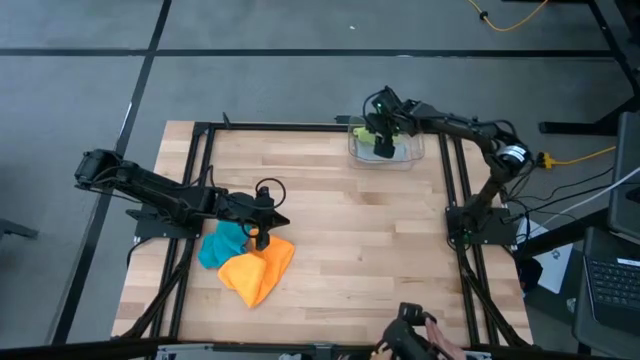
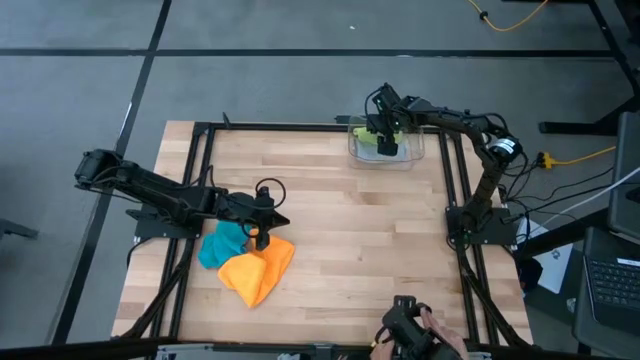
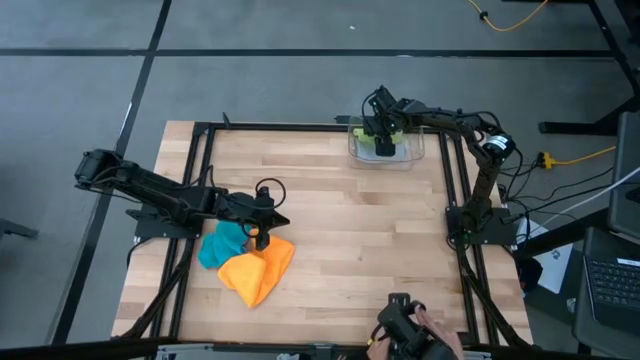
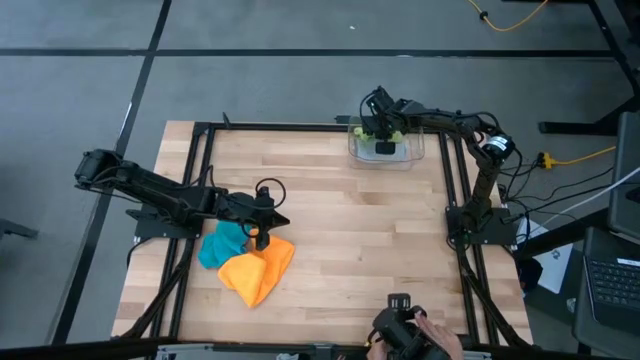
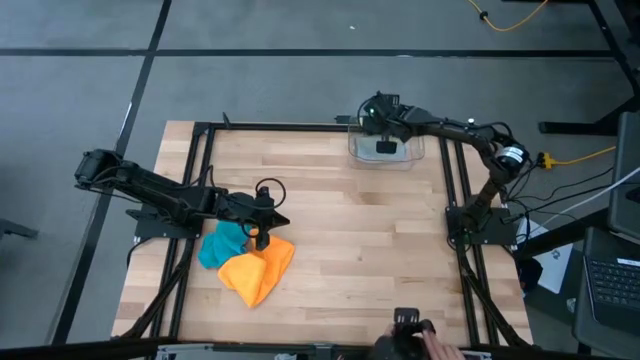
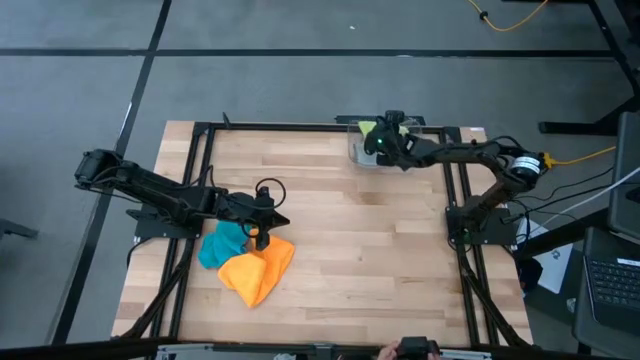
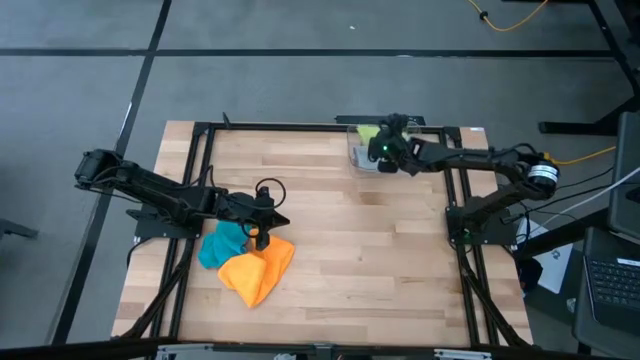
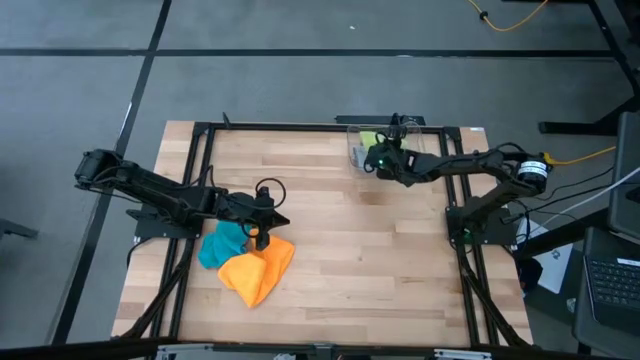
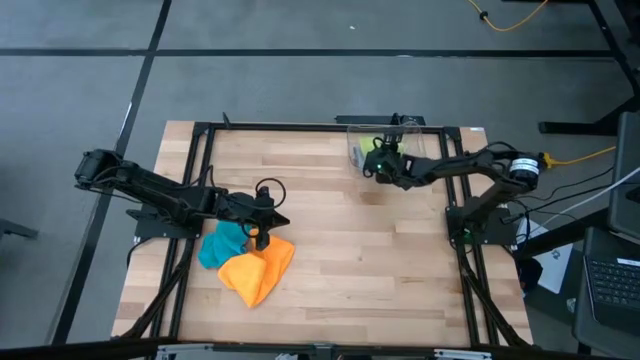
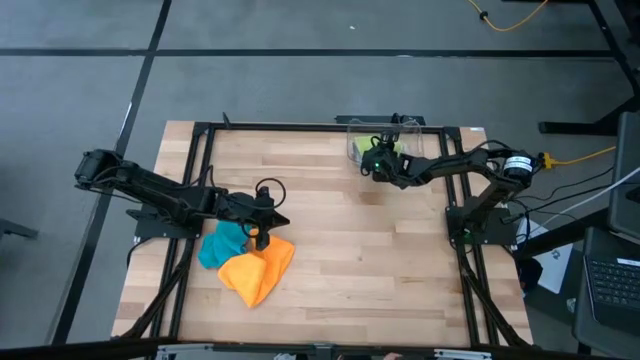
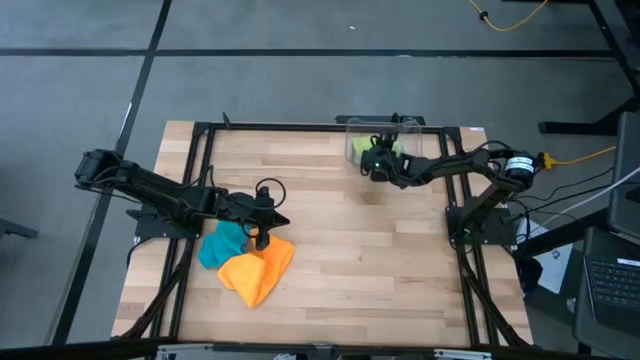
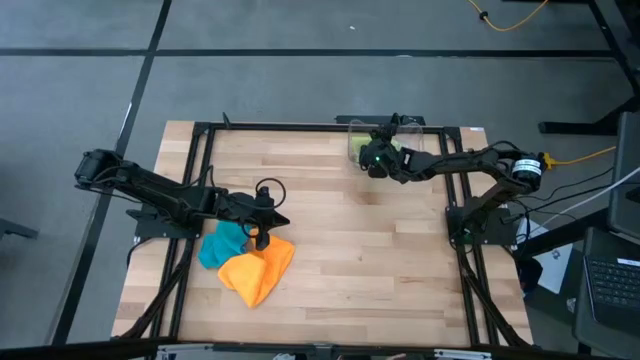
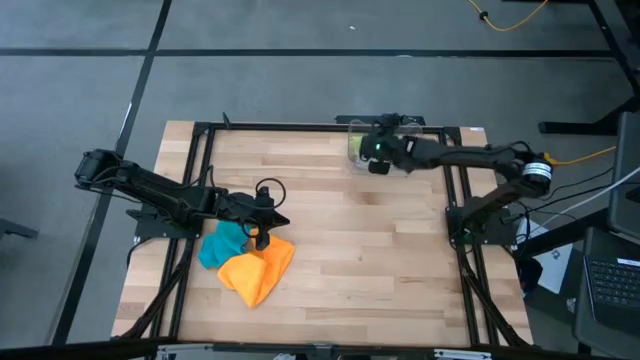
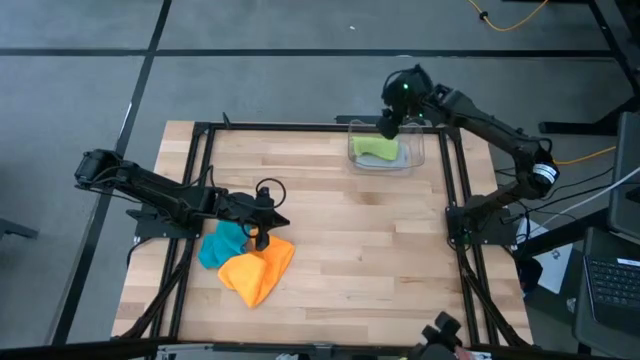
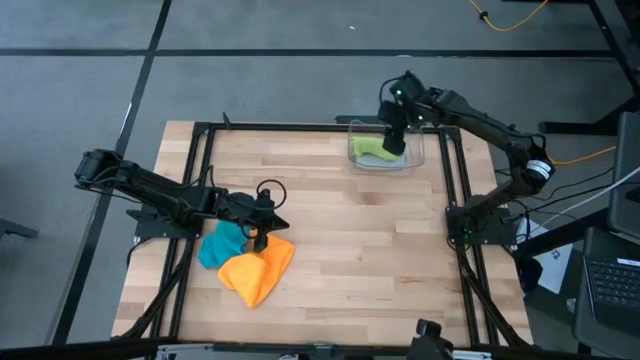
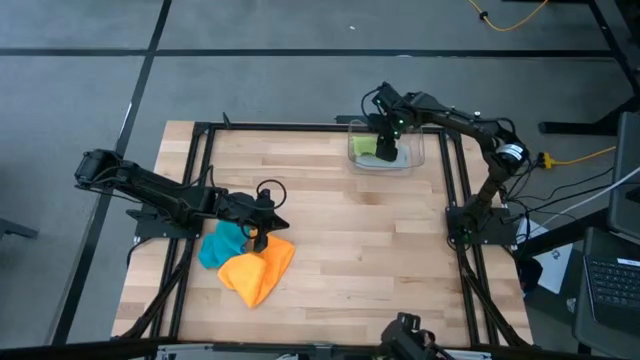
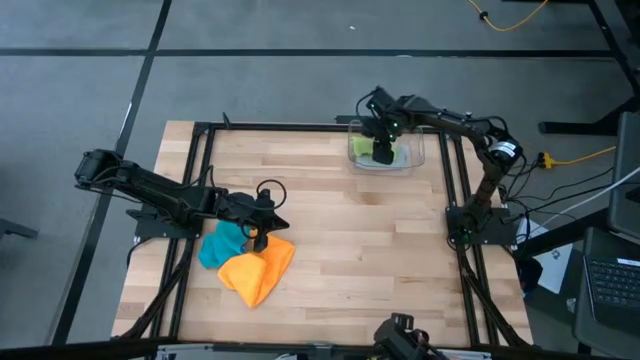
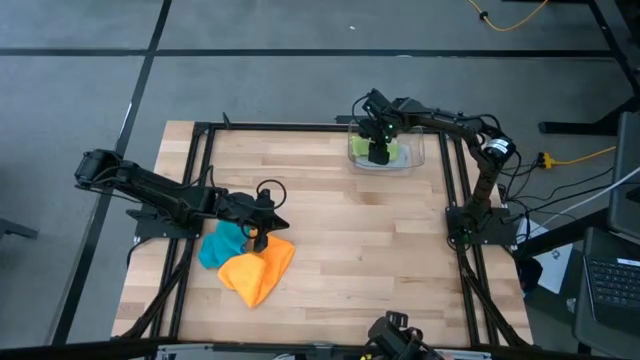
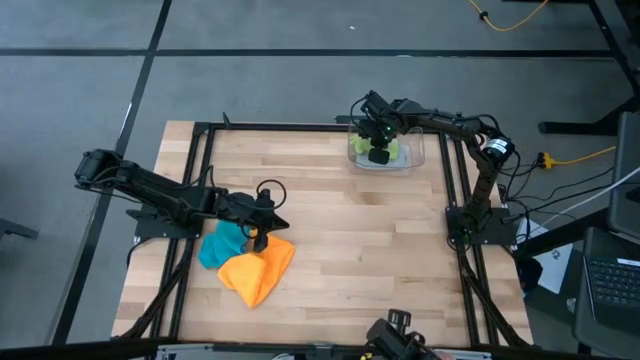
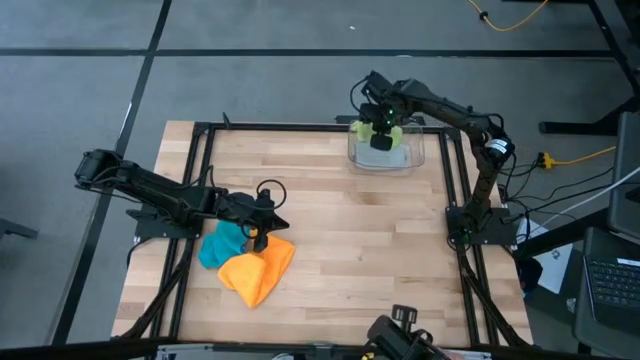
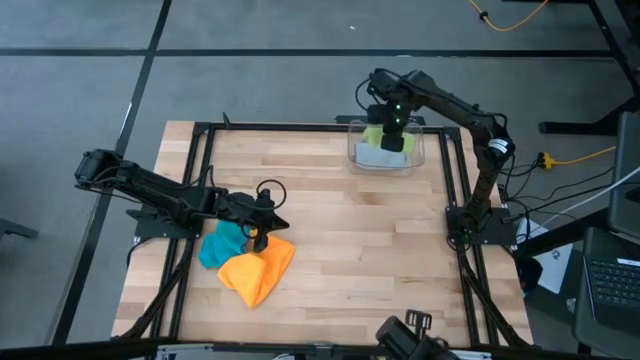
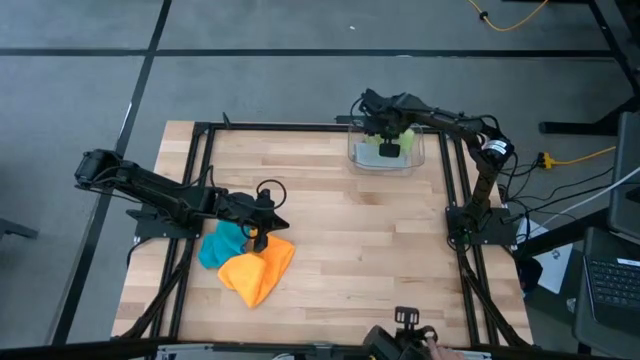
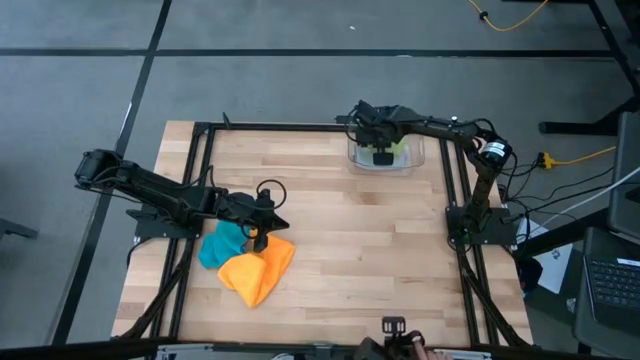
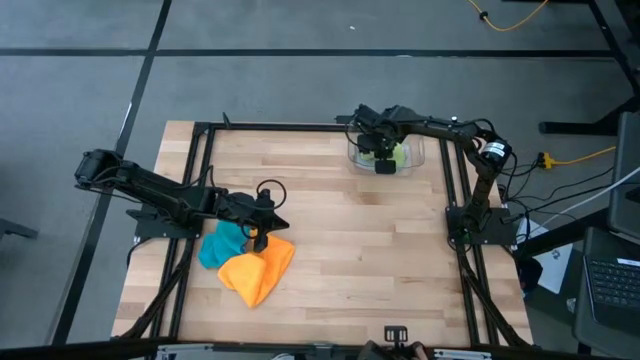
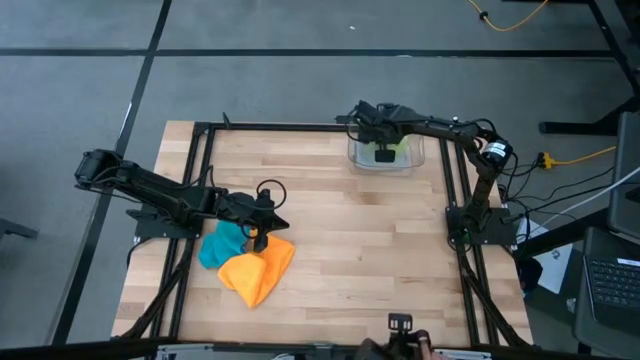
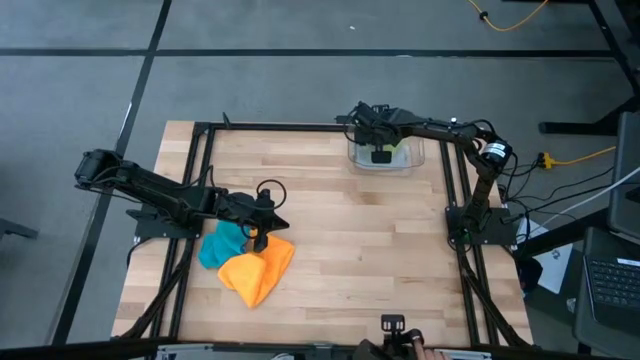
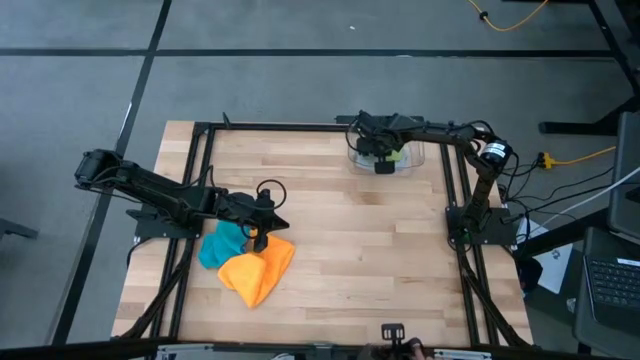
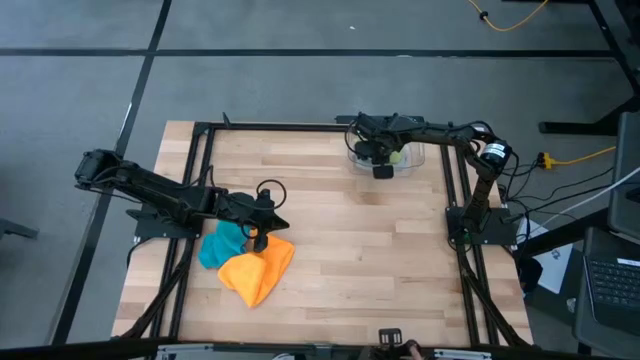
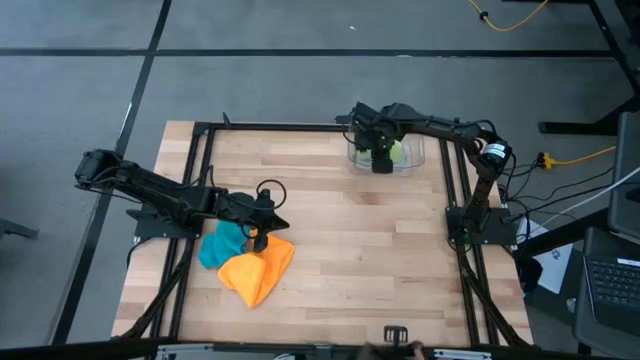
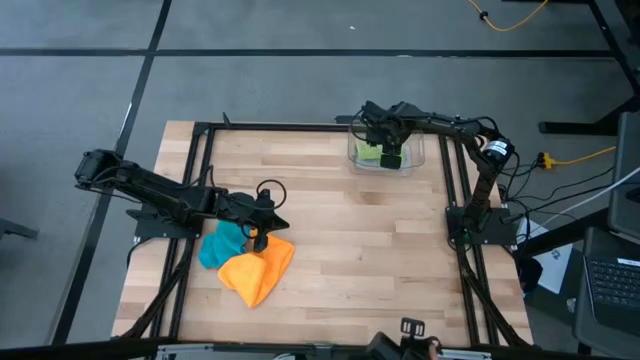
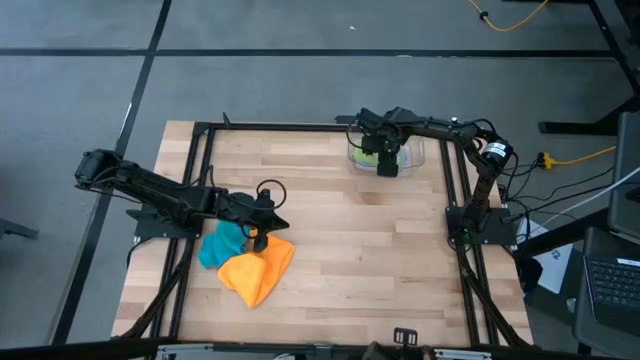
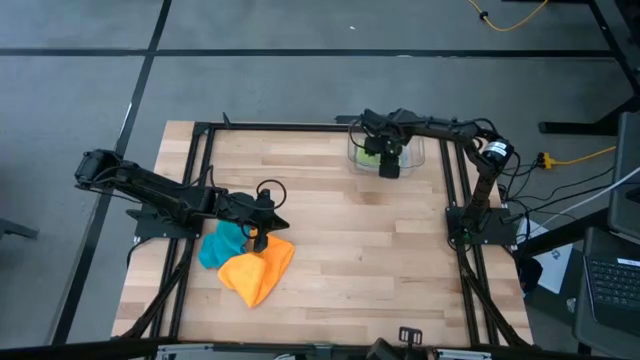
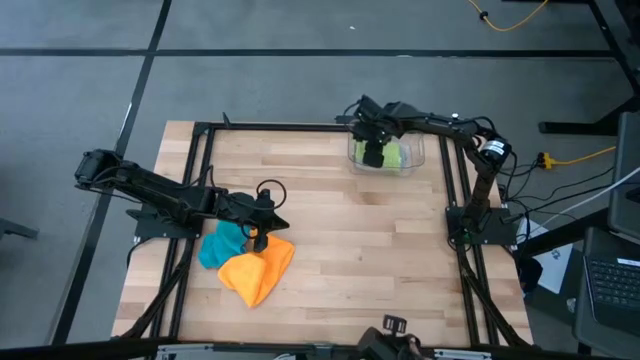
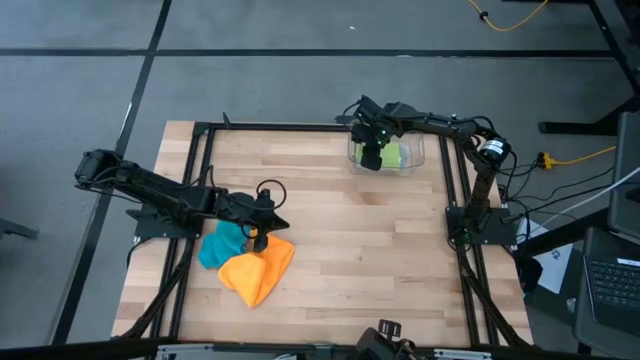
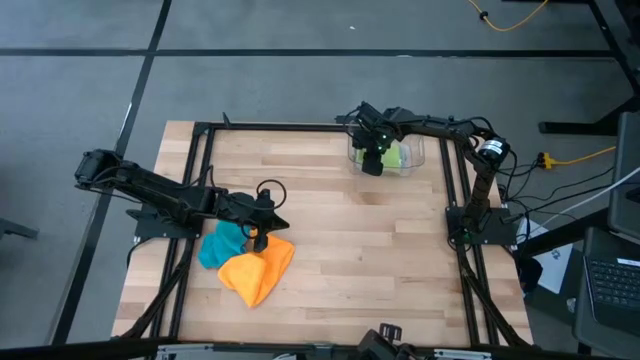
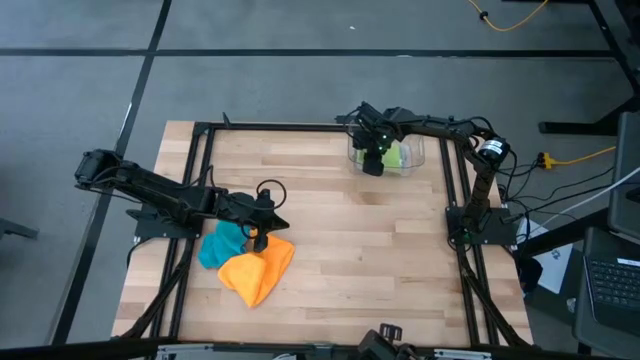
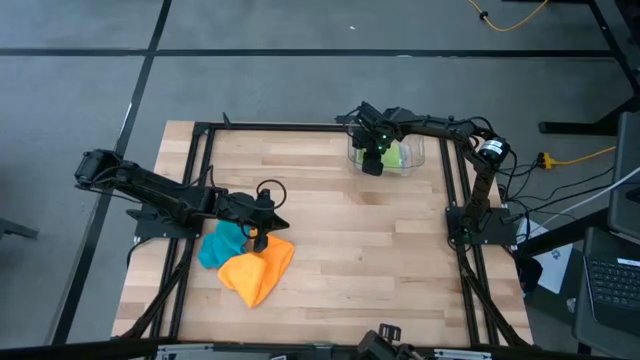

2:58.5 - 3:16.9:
Task: Fold microfiber towels
Put the folded green microfiber into the transparent bin

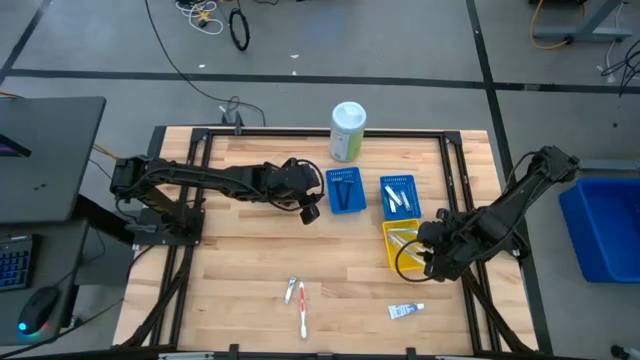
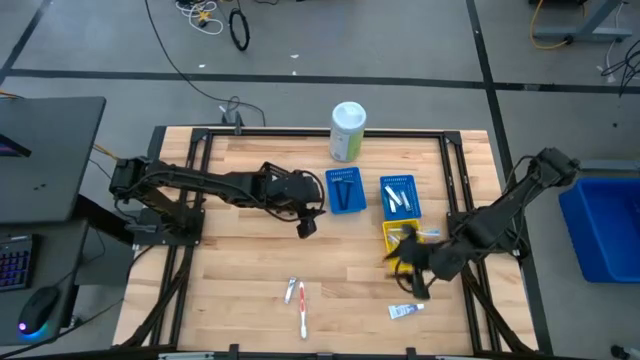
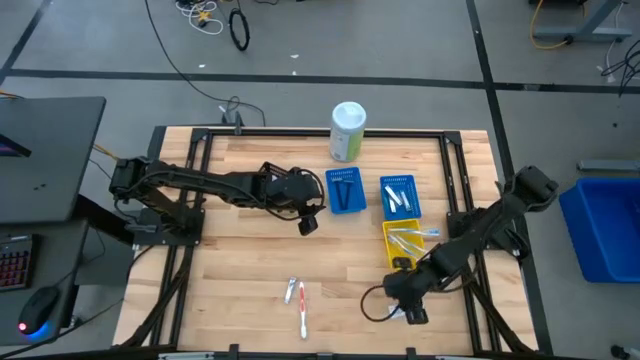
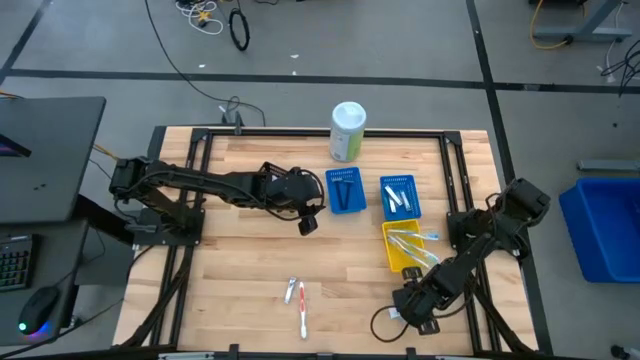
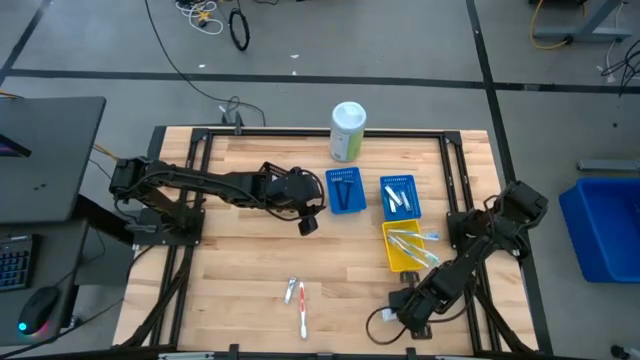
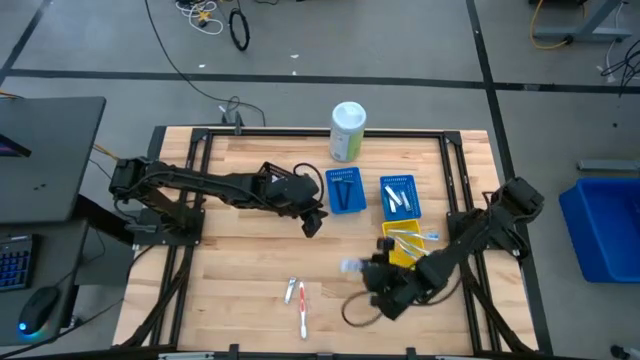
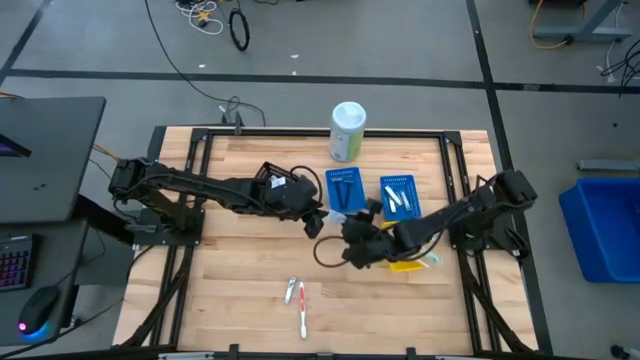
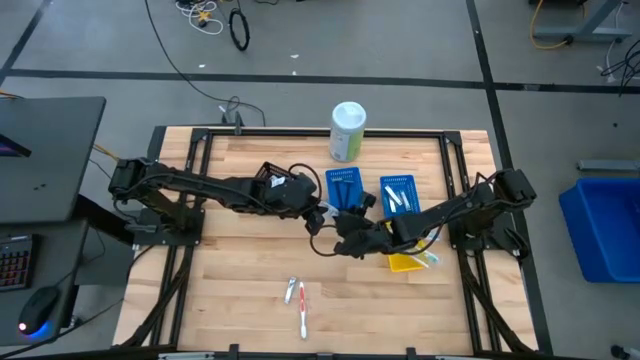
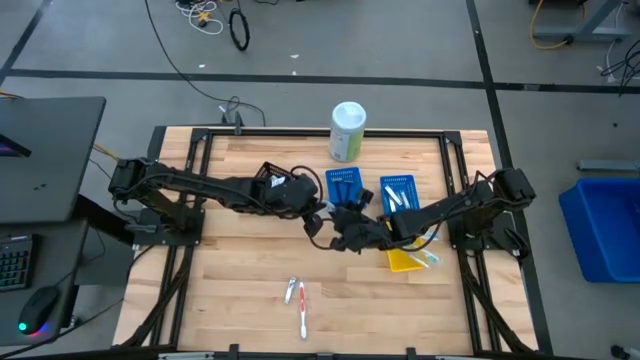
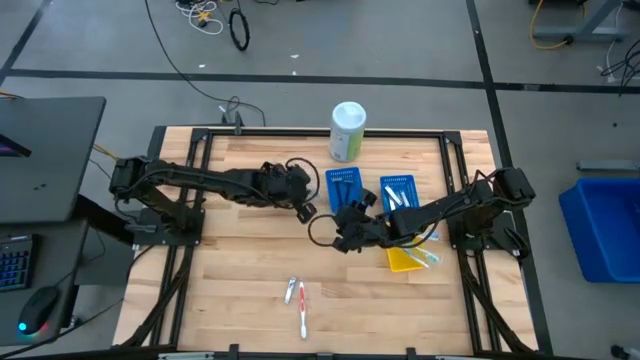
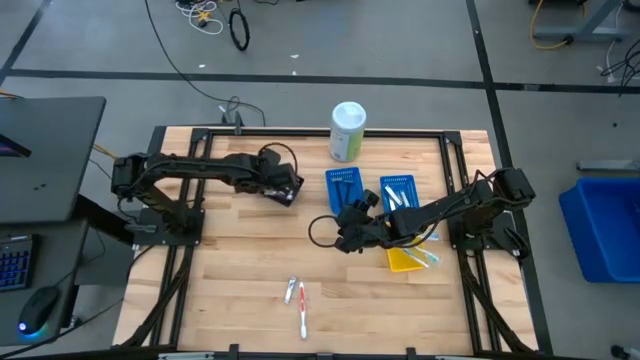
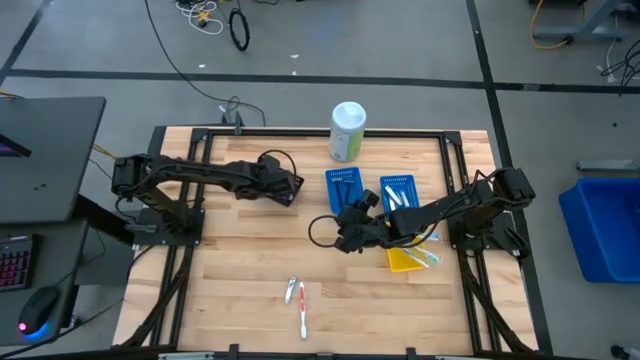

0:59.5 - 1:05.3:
Task: Pick & Place Travel size toiletries
Put the toothpaste into the black basket
